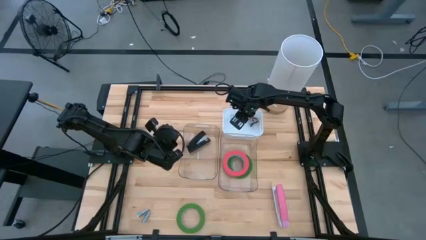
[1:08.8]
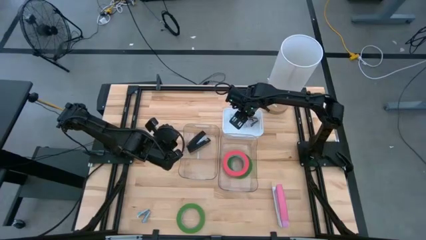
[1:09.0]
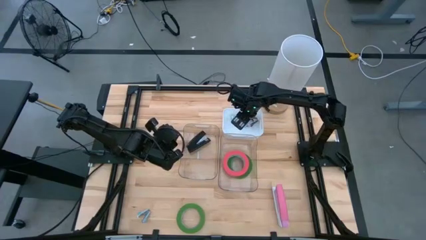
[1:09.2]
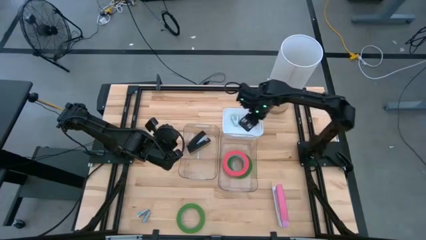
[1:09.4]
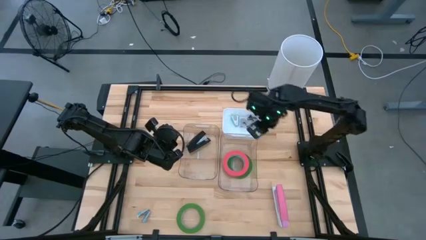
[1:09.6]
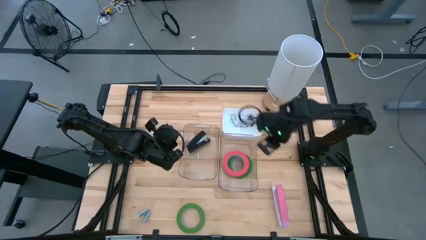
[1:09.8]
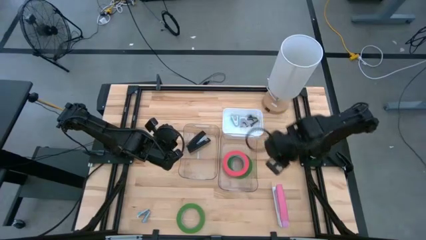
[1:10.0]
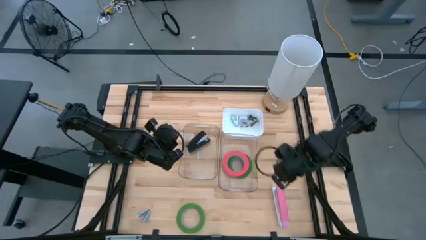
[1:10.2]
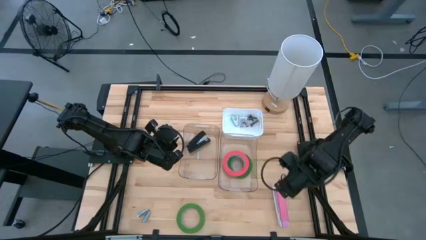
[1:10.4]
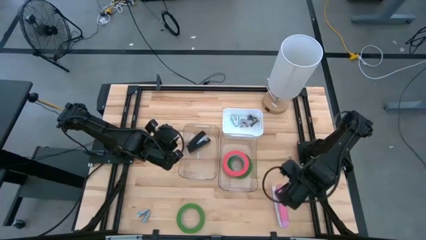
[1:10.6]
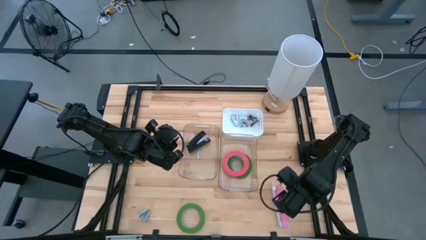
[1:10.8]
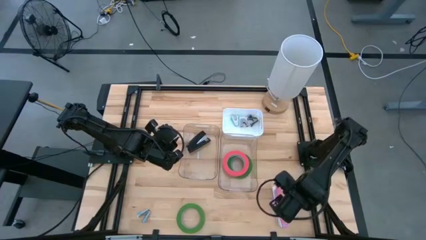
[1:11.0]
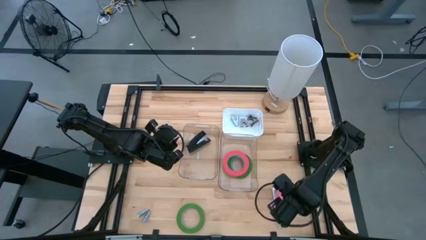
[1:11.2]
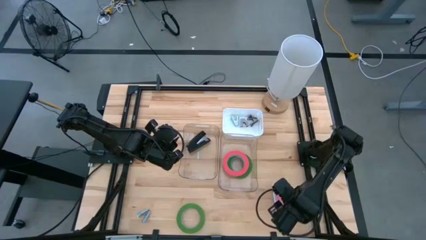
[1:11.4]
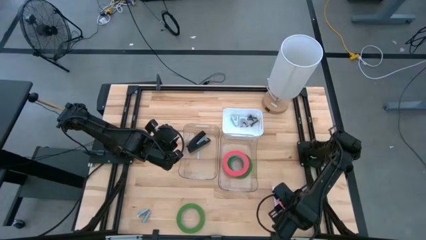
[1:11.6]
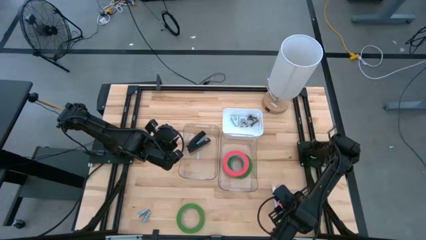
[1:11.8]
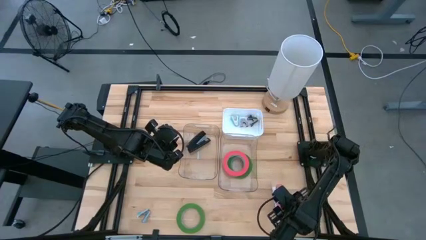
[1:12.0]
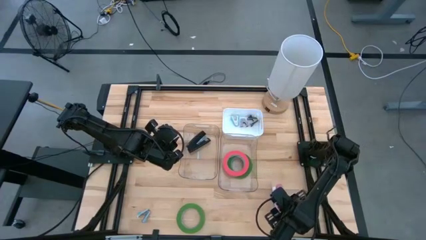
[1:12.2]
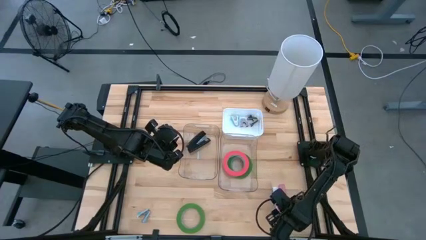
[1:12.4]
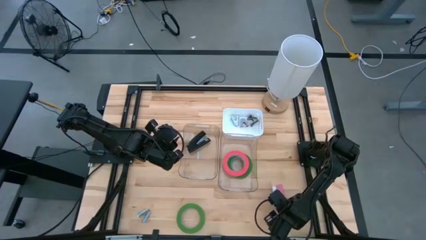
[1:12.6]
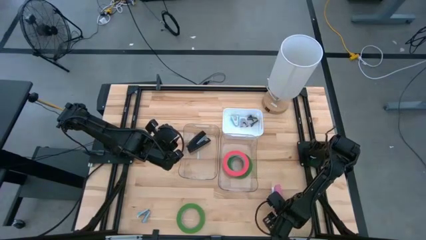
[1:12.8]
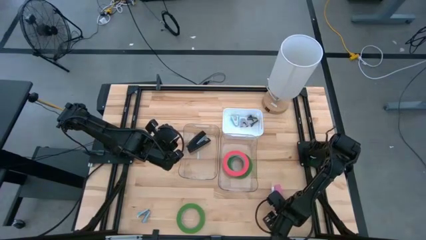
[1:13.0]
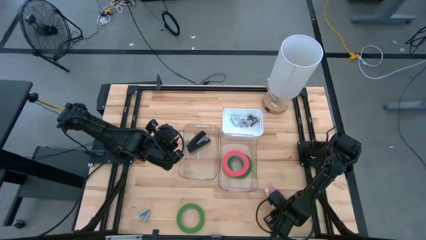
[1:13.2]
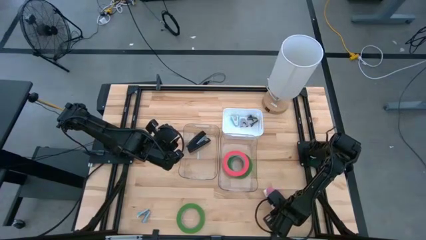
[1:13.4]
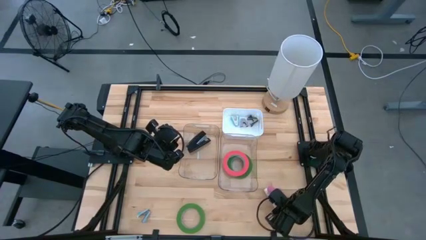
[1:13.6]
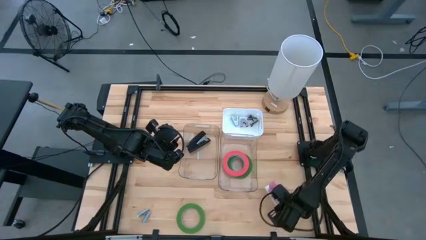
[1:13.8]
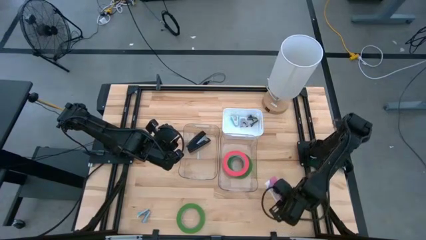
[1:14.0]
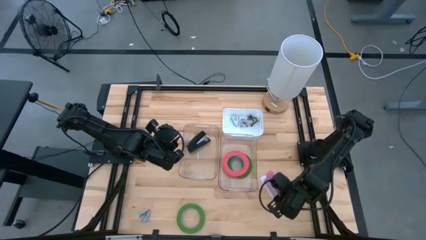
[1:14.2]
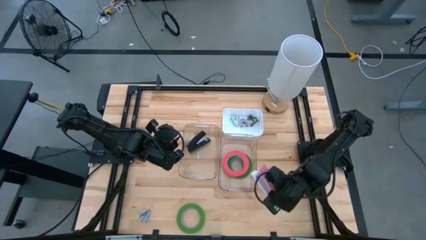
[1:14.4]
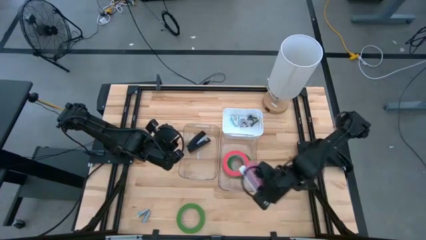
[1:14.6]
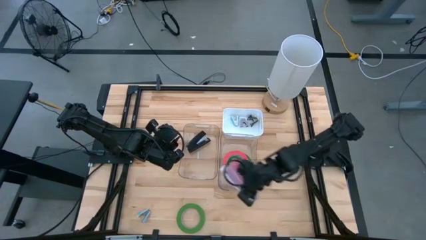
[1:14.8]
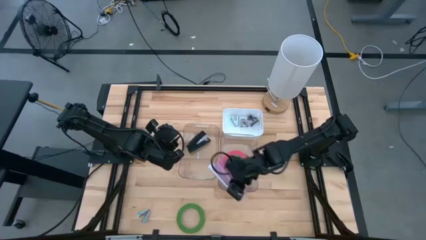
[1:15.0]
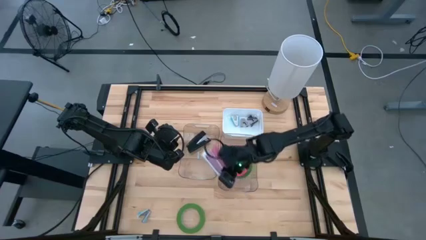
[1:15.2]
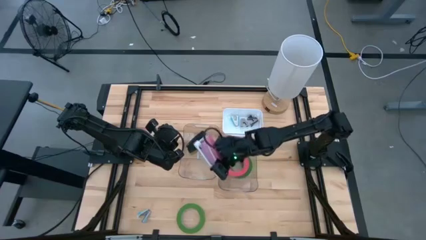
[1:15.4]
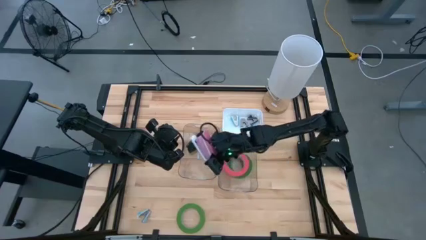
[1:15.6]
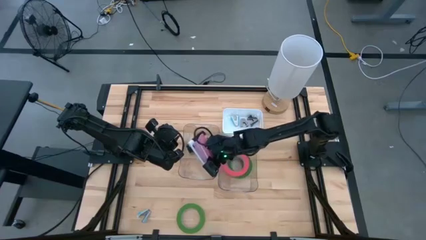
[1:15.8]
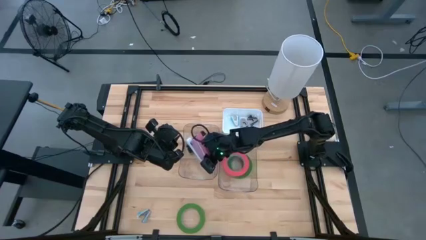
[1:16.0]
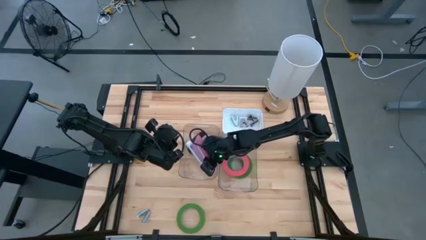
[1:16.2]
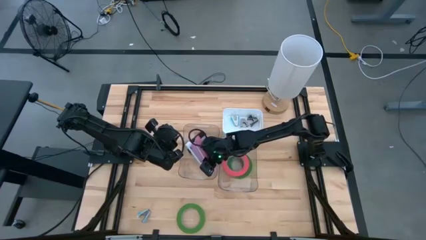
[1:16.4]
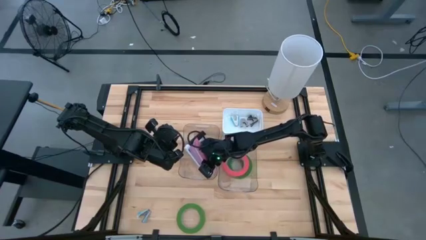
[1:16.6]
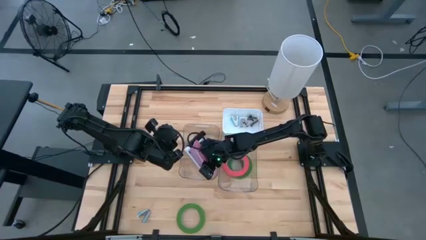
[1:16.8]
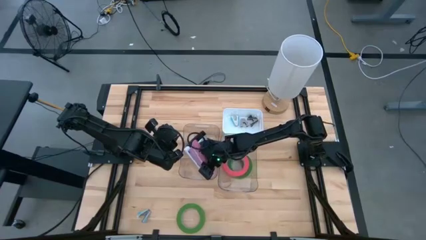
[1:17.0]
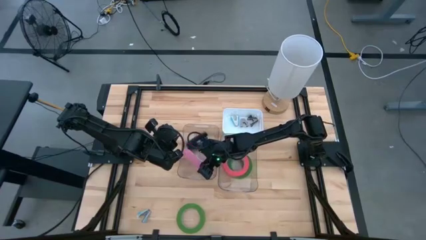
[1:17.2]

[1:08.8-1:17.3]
Task: Pick and place Stapler, Stapler remover, tape
Put the pink stapler into the left transparent bin

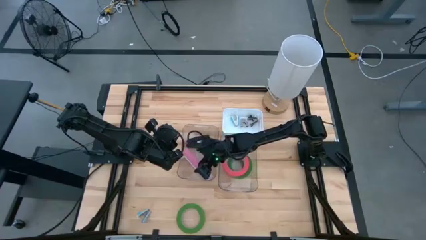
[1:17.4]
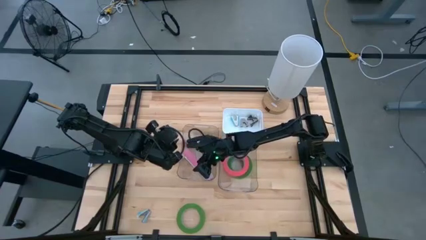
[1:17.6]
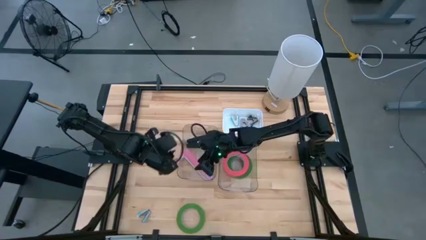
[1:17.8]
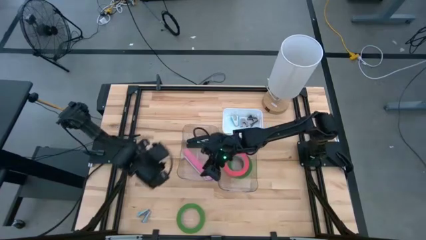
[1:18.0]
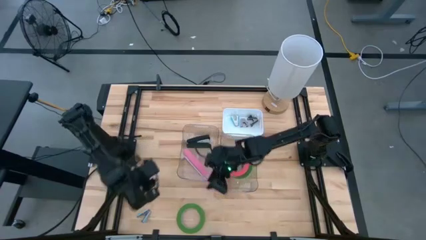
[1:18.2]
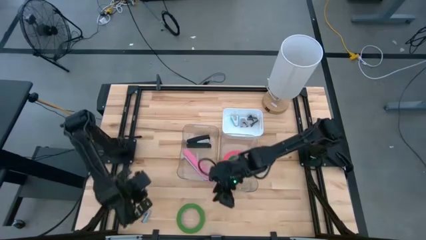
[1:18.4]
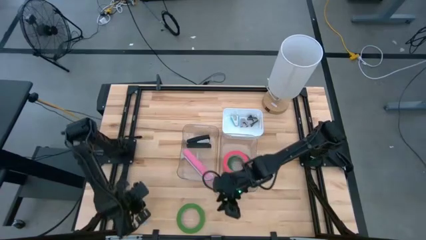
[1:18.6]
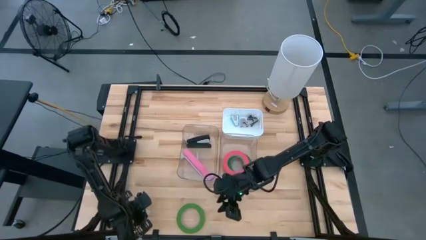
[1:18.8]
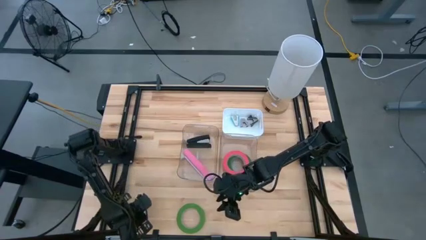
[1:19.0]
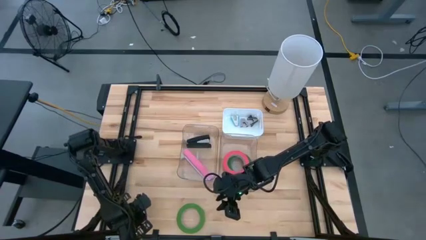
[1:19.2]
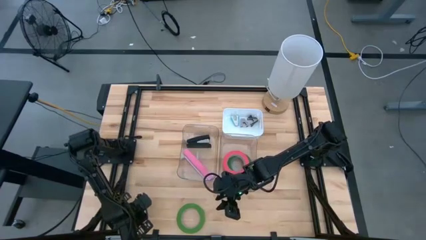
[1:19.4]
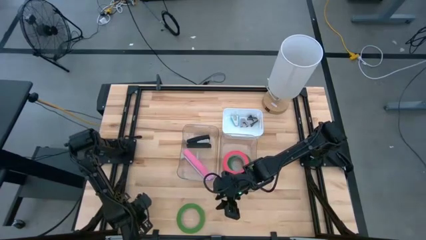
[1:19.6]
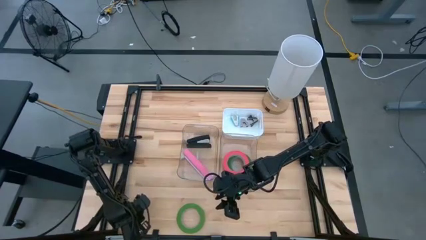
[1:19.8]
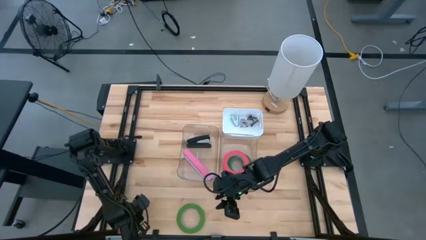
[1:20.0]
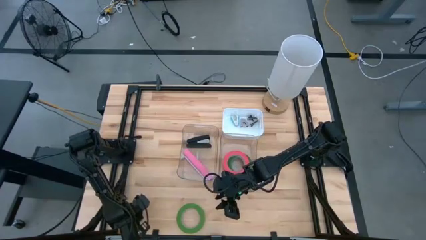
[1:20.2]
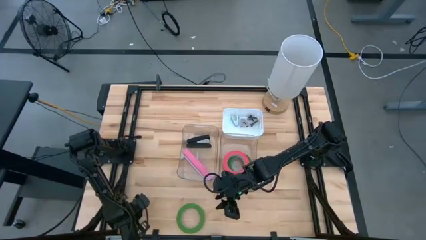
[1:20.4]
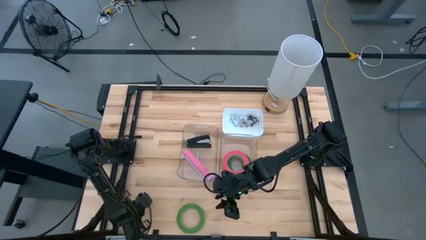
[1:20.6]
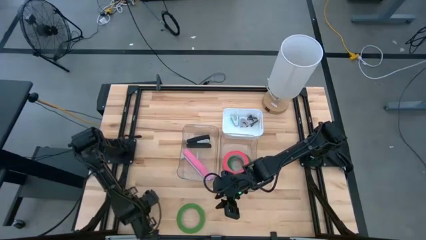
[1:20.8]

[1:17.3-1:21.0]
Put the blue staple remover into the white bin

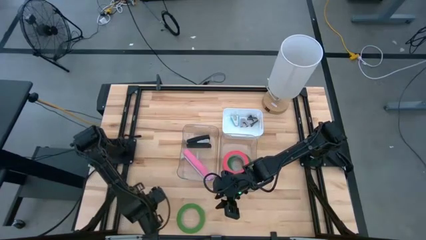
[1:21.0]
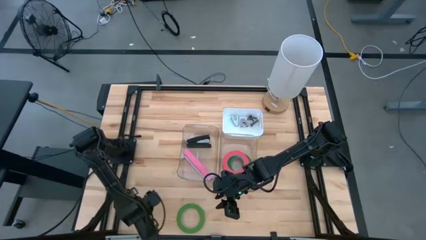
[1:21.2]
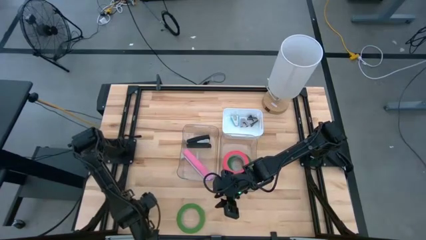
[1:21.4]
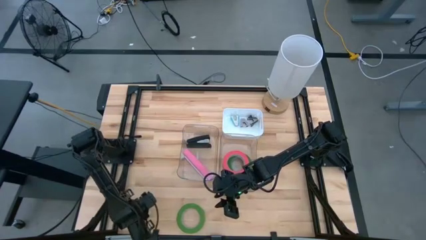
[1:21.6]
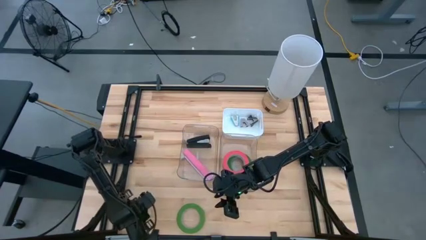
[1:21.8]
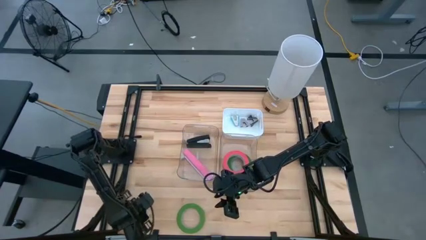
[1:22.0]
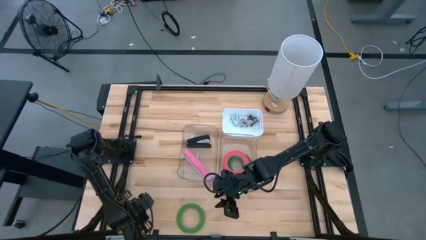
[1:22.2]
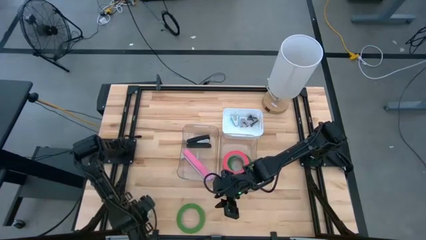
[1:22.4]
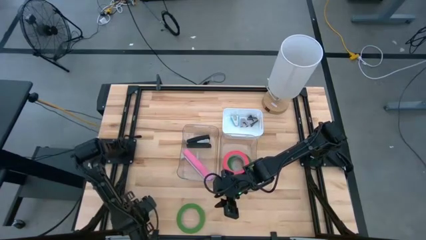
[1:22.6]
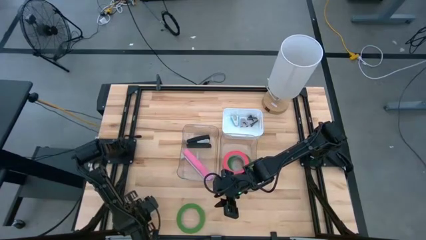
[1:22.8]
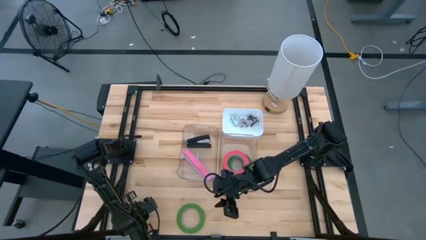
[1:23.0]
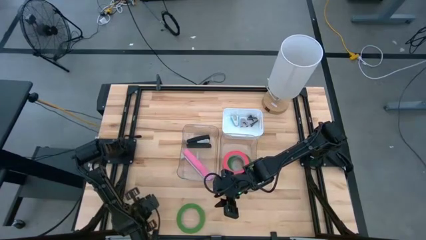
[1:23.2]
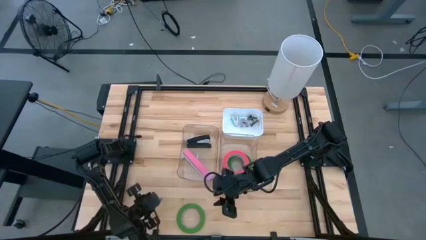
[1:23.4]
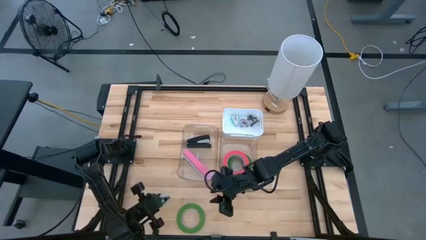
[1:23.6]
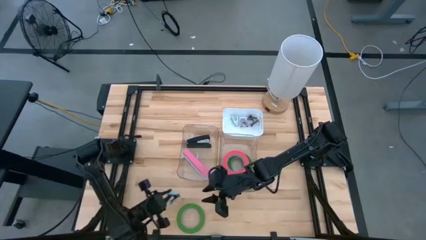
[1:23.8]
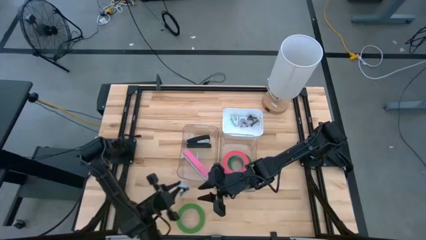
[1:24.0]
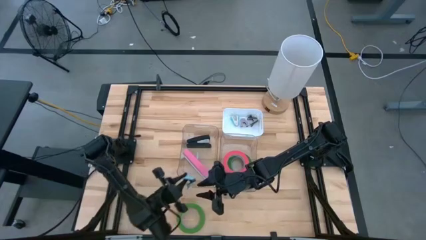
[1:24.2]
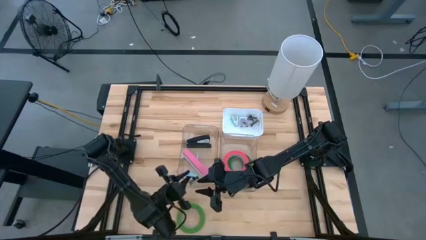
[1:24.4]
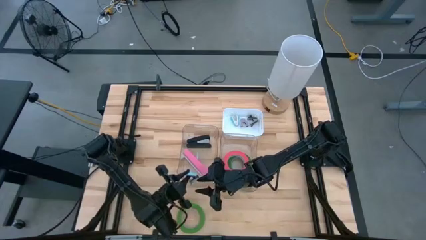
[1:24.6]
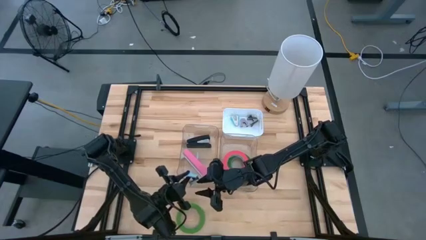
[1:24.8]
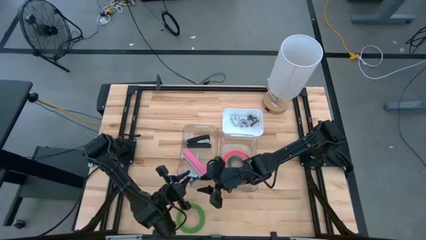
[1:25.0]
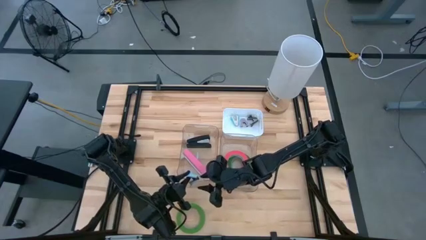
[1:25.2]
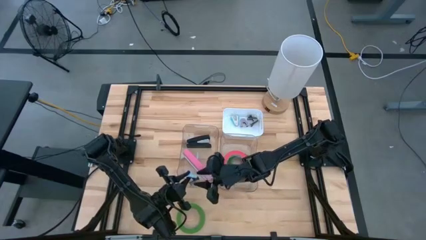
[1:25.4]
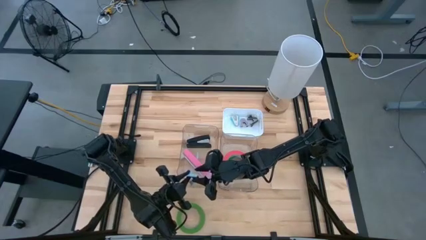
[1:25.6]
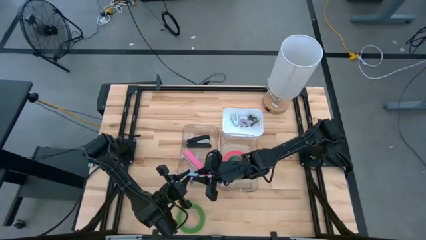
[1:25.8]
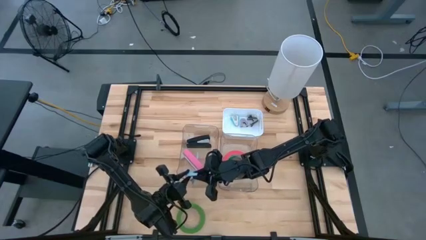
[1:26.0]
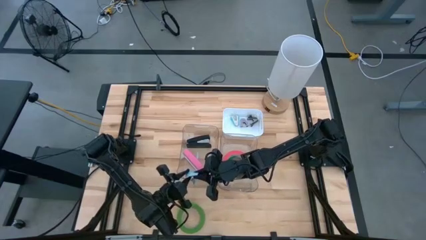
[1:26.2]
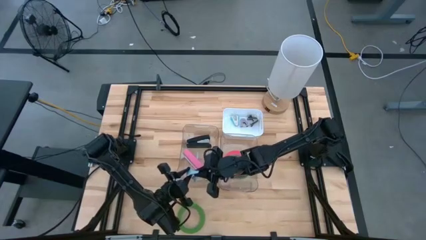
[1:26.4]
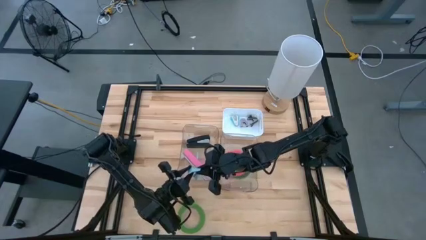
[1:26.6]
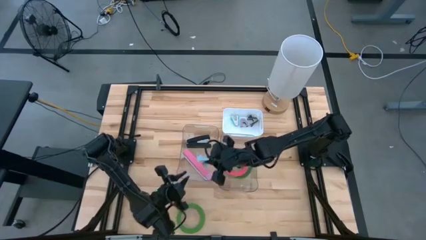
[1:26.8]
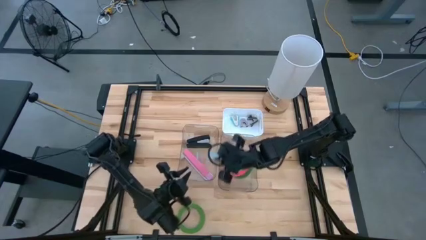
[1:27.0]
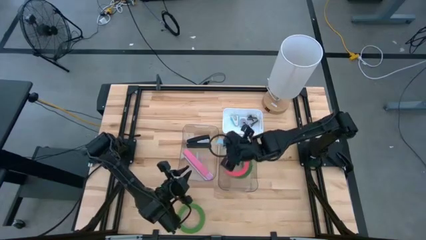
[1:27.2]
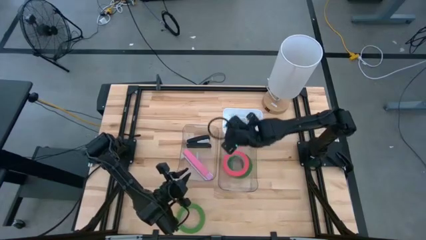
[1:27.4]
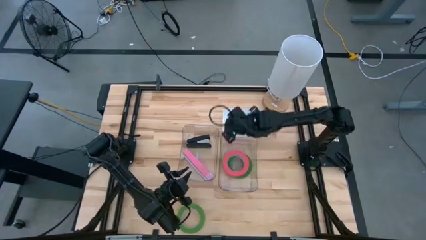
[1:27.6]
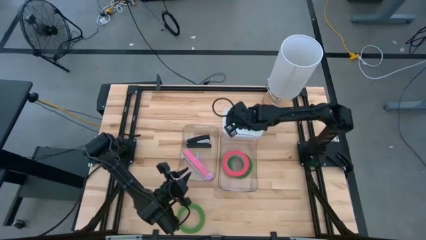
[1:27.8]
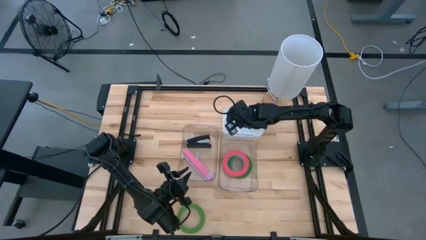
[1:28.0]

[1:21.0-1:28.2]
Put the blue staple remover into the white bin
